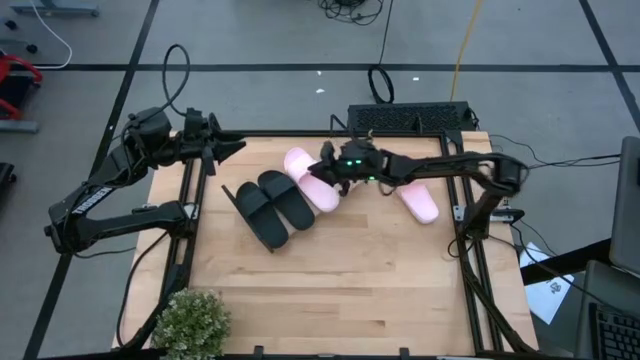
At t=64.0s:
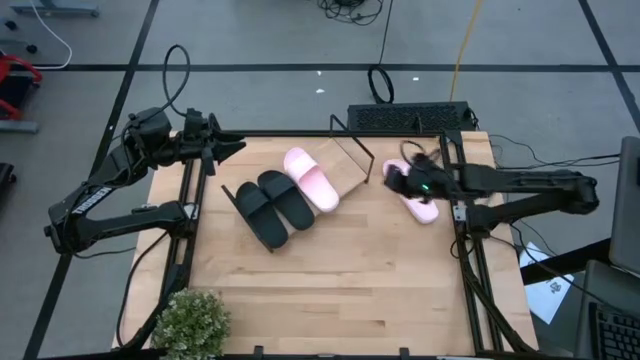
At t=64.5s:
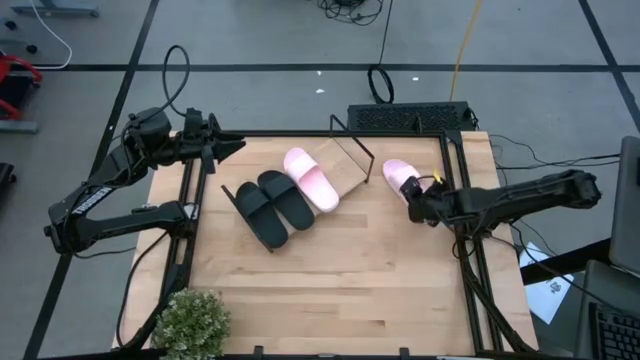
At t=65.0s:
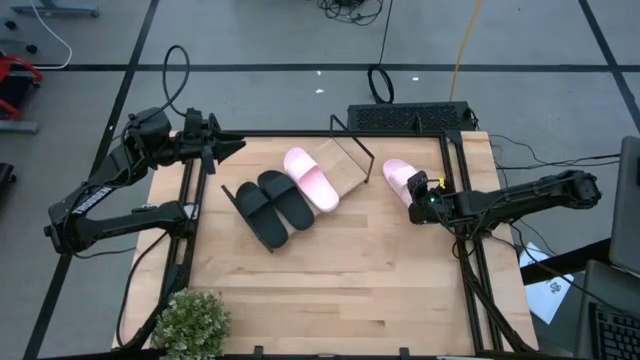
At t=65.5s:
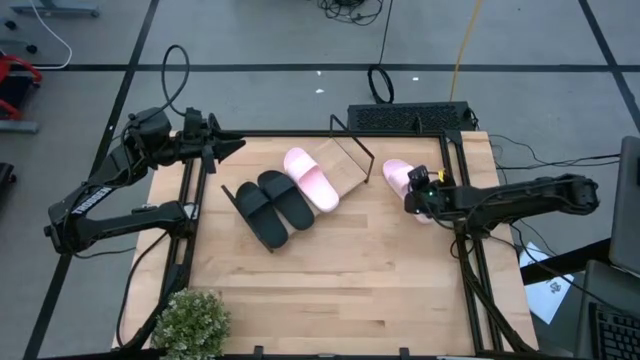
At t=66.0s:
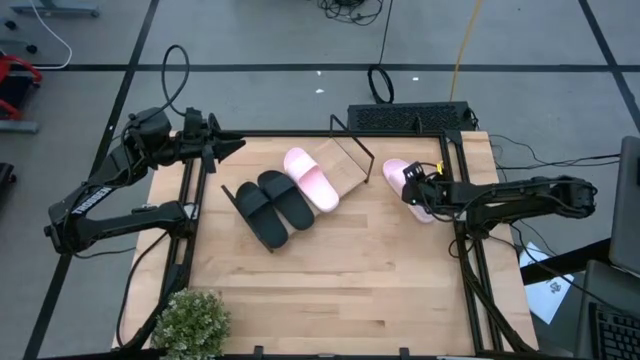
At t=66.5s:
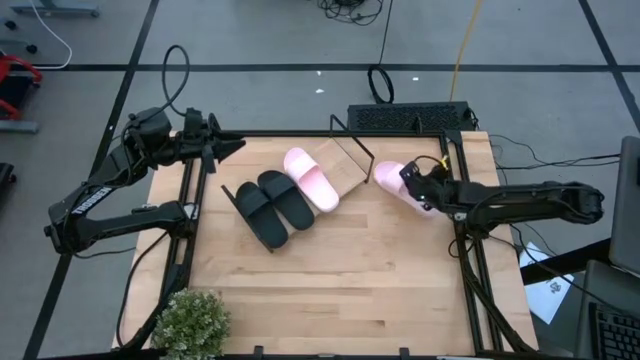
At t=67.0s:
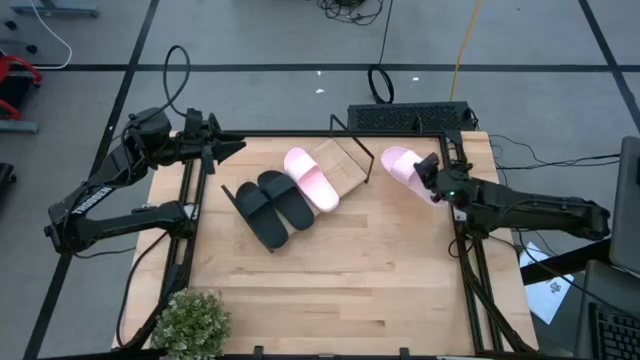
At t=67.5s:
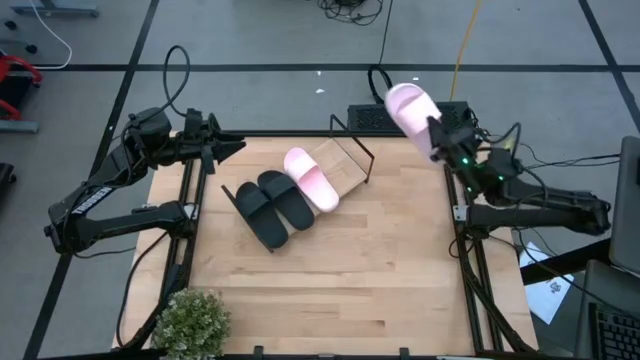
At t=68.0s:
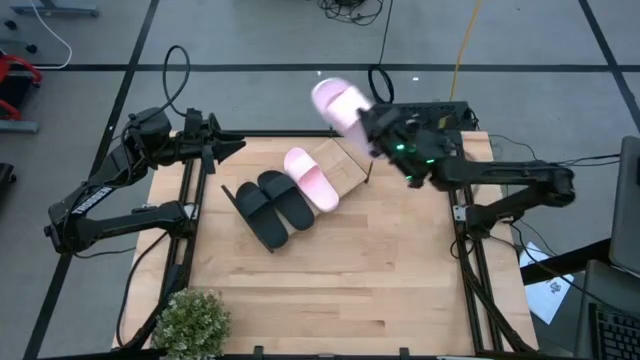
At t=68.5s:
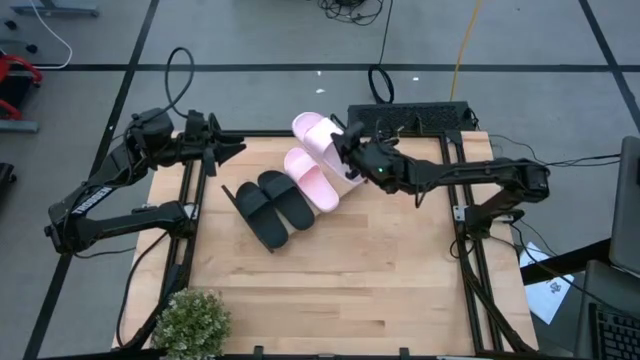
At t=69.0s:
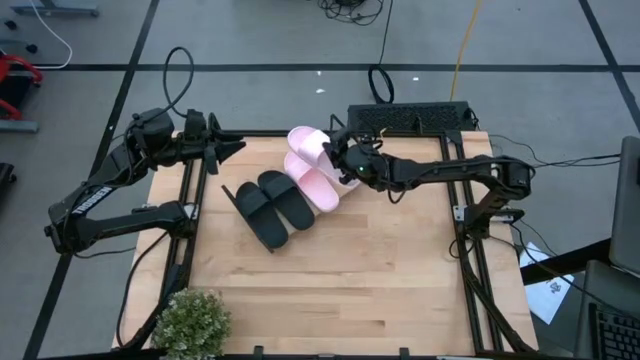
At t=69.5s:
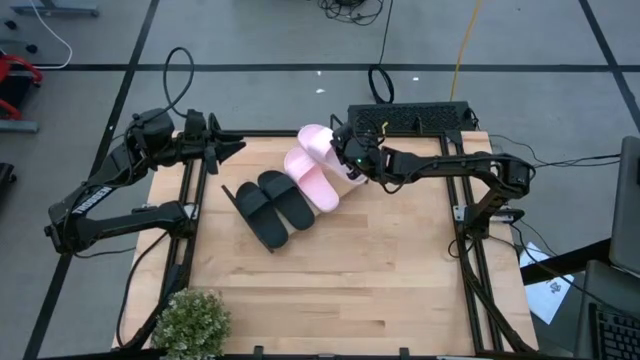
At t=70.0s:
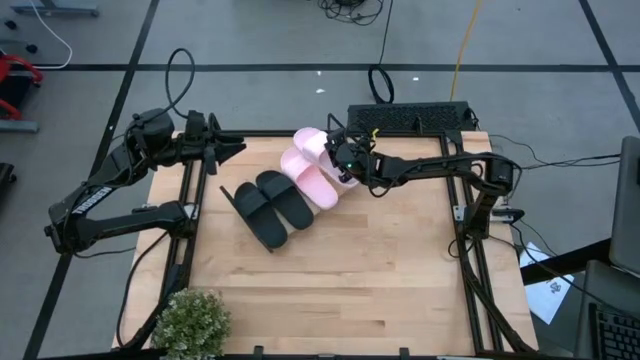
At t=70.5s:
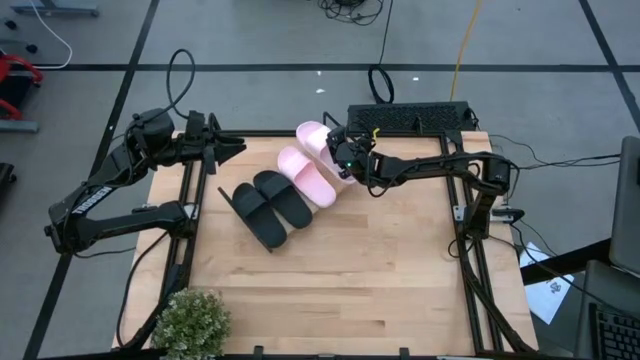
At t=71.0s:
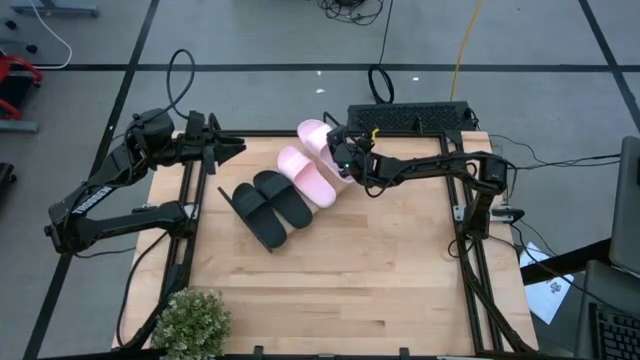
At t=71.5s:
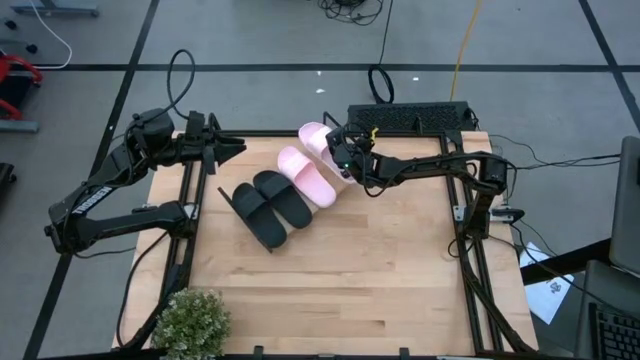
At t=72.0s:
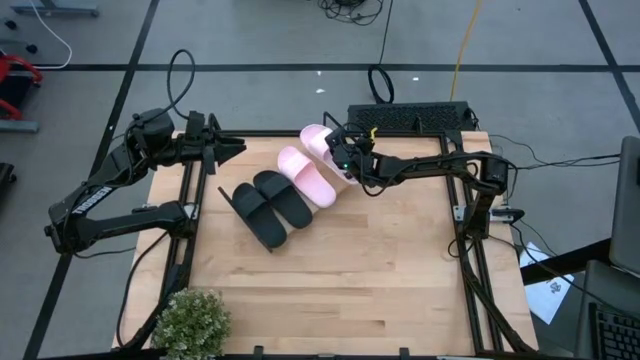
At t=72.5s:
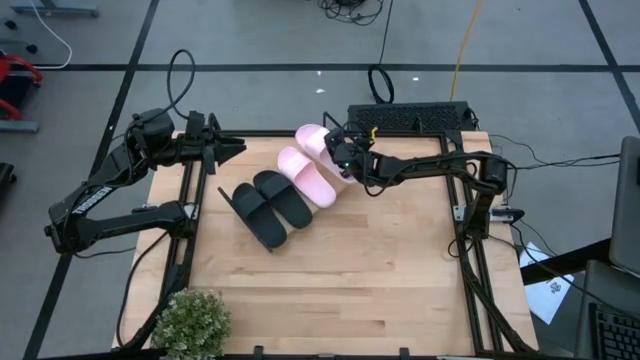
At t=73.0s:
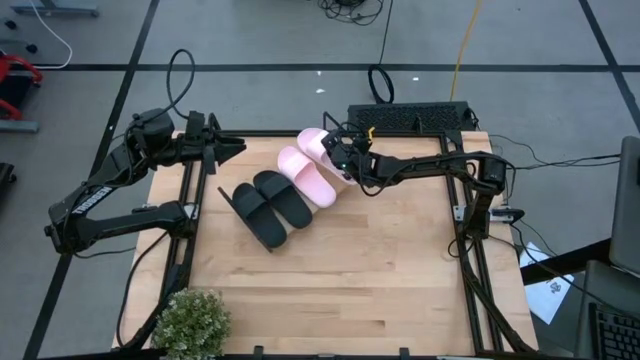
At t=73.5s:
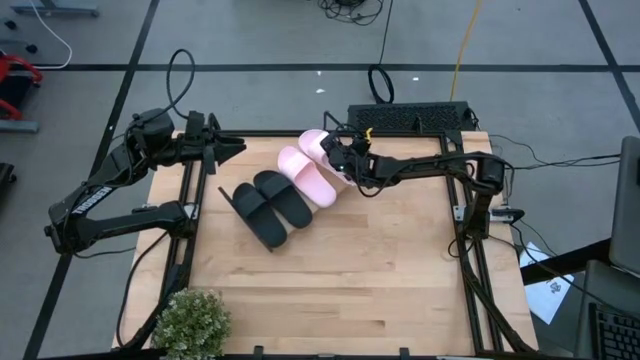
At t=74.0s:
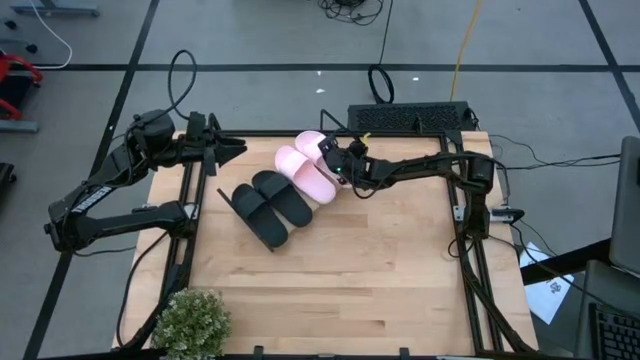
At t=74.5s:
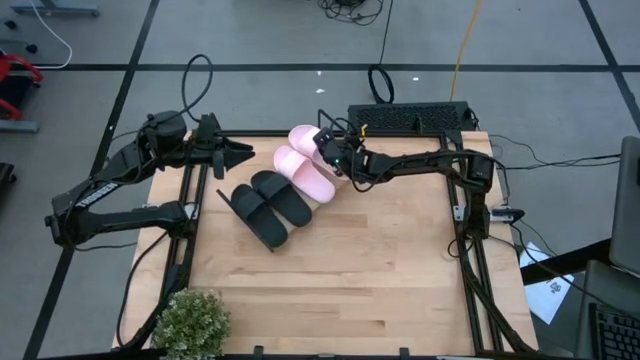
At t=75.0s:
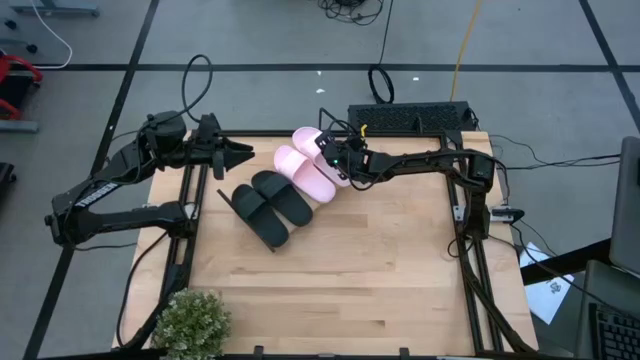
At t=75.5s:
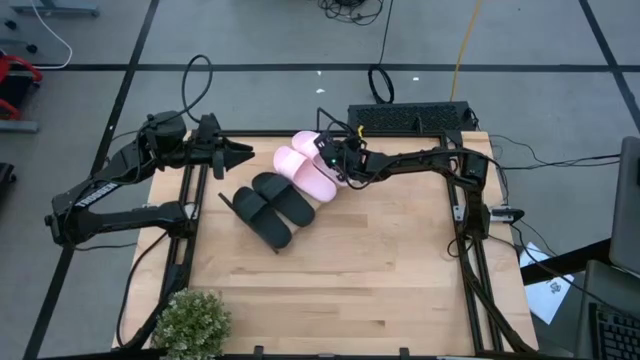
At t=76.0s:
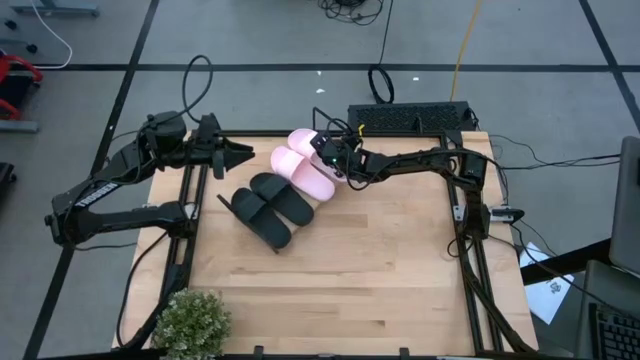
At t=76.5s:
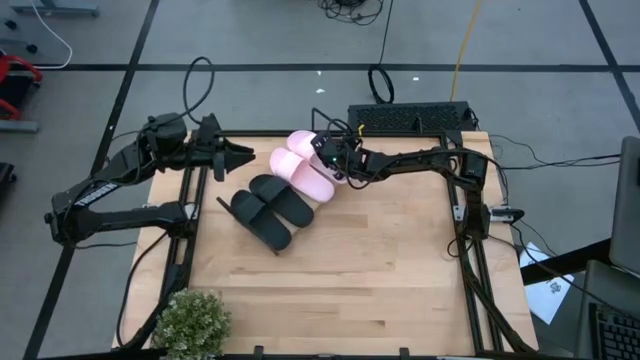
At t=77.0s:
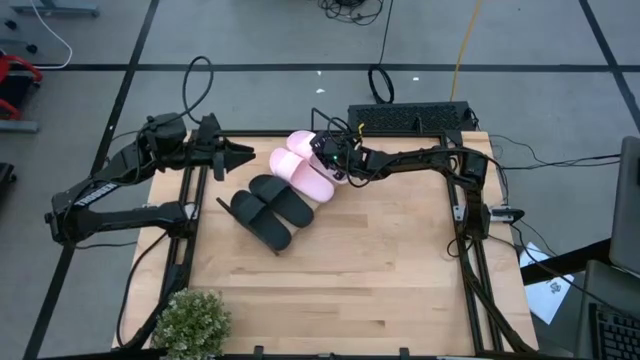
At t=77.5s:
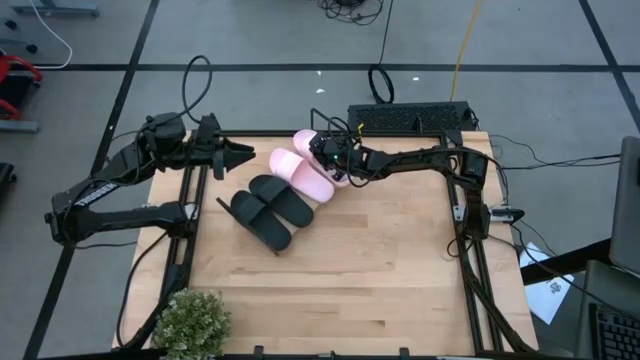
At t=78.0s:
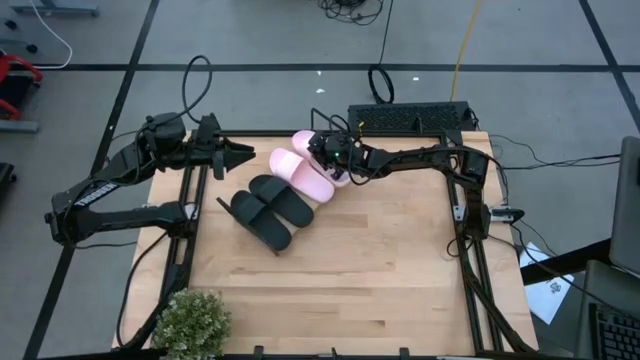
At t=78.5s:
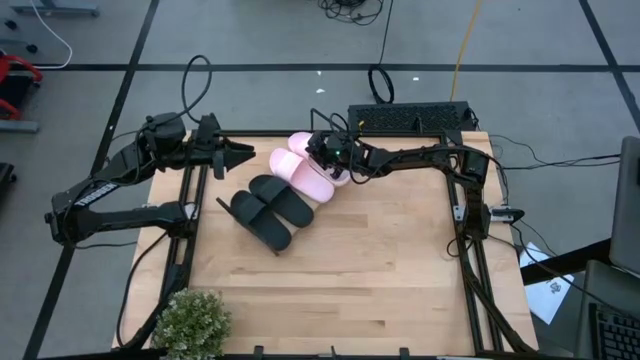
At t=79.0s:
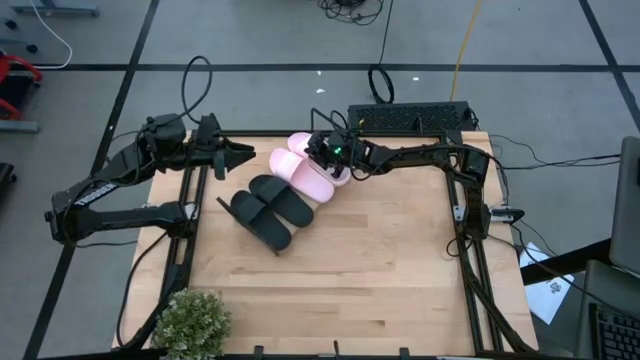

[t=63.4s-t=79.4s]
Task: Pick and place slides into the shelf
Put the pink slide on the shelf
